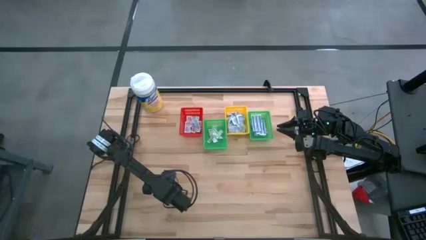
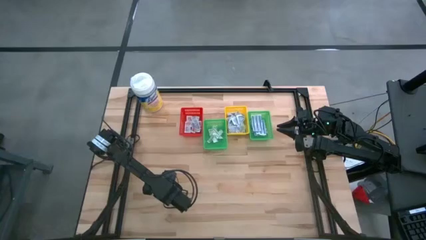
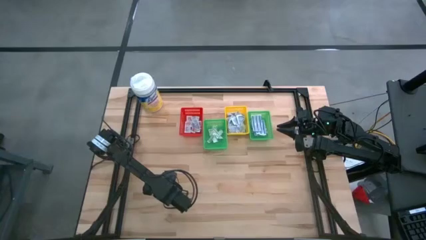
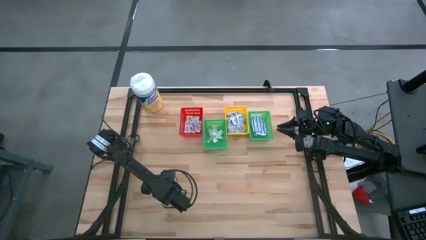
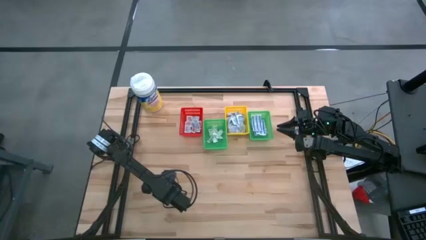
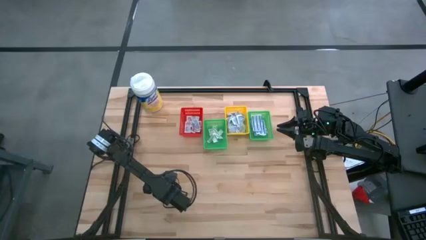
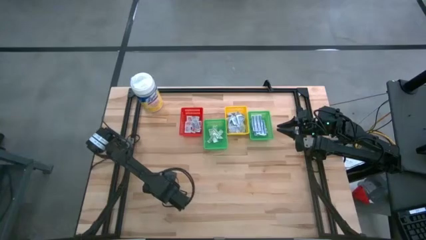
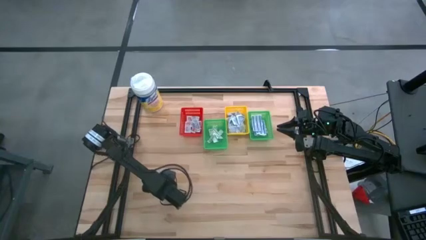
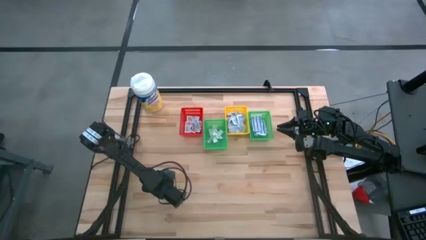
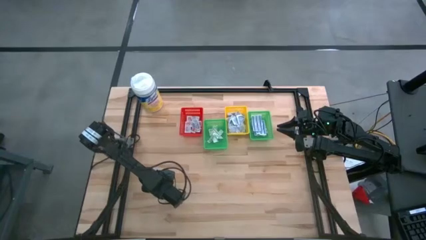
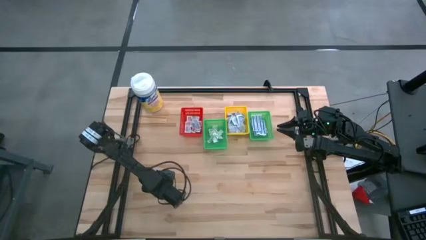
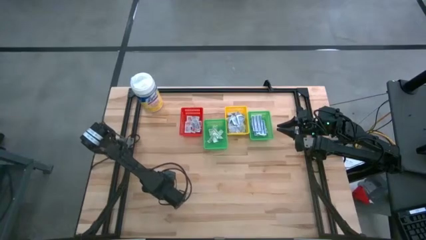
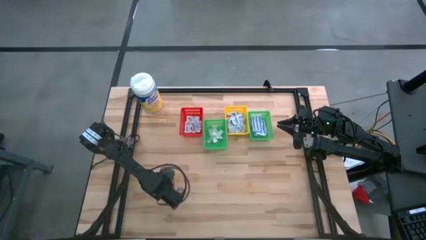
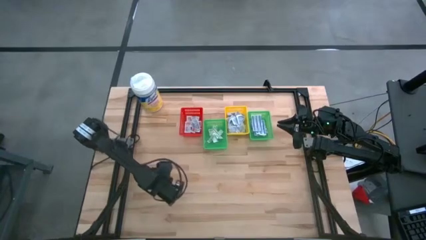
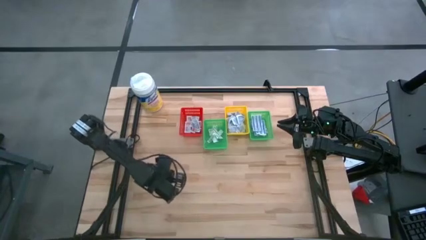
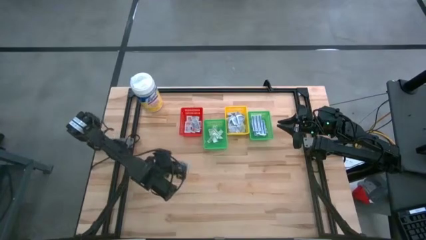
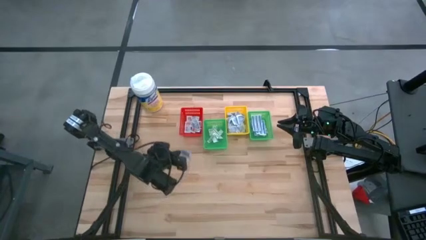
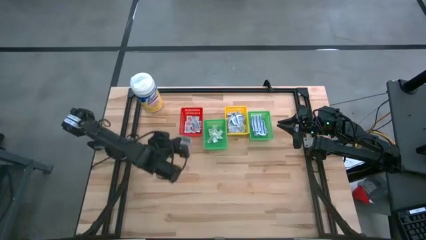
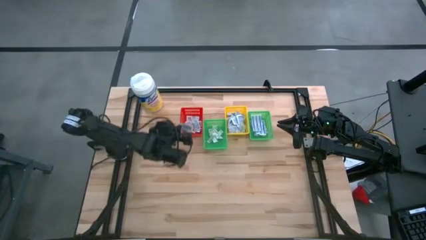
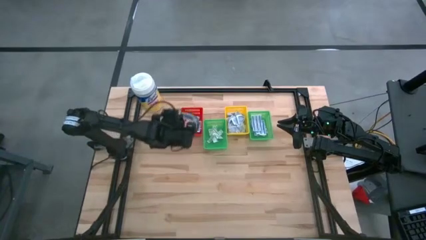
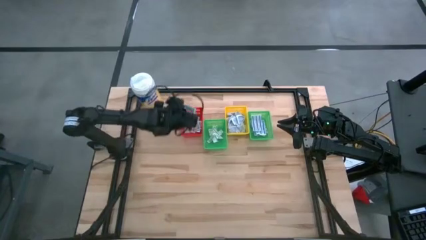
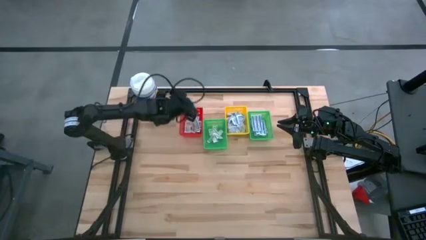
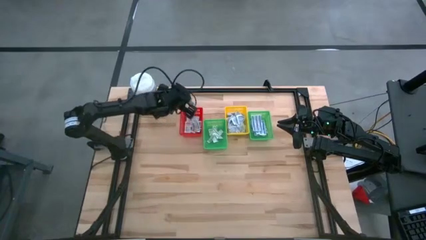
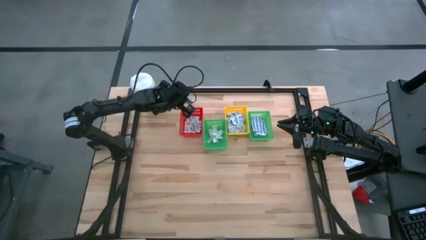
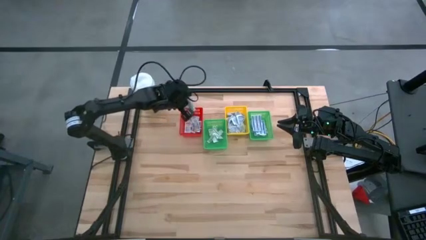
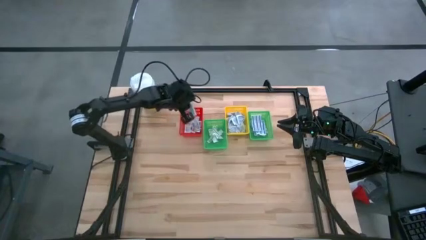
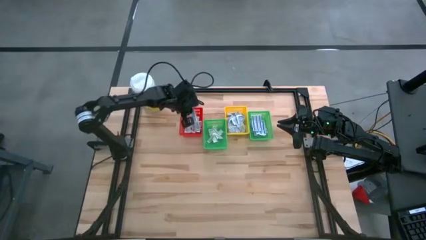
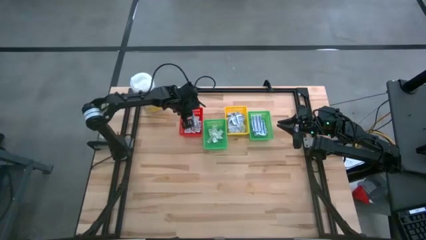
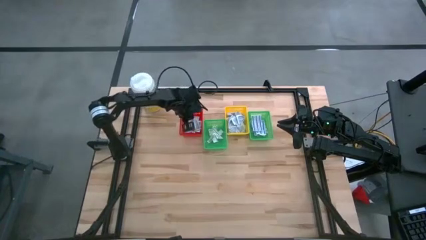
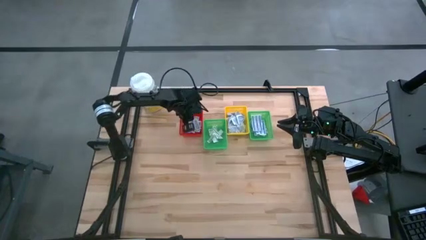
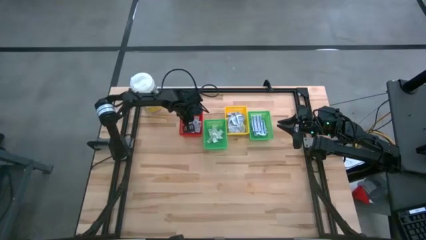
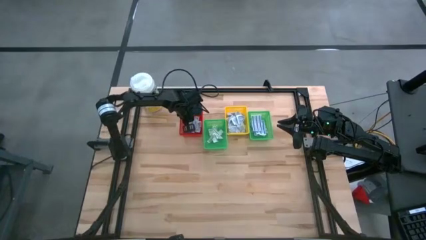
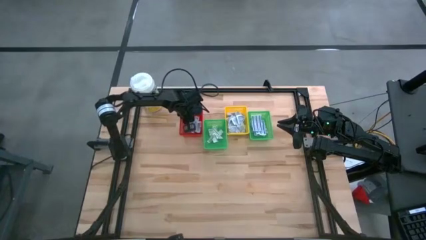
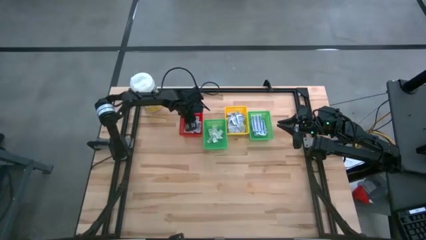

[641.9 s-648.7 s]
Task: Pick & Place First Aid Supplies
Put the ointment pack into the red basket

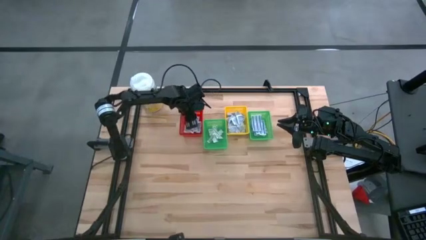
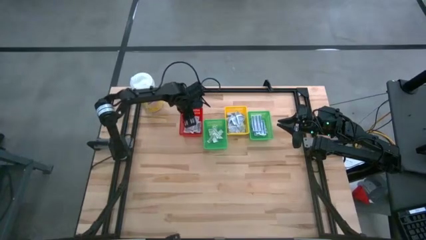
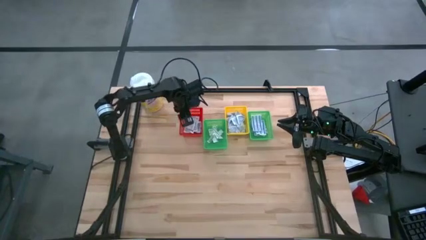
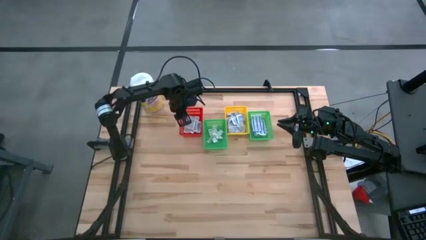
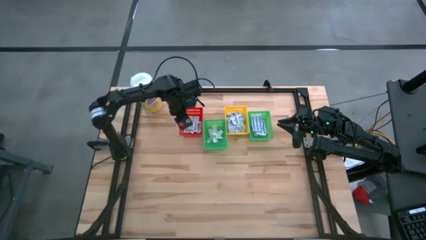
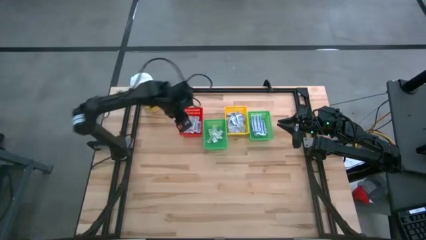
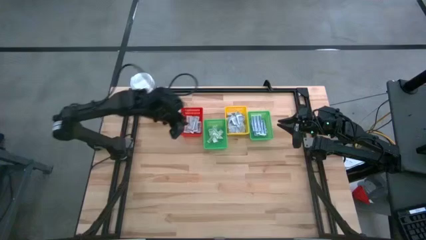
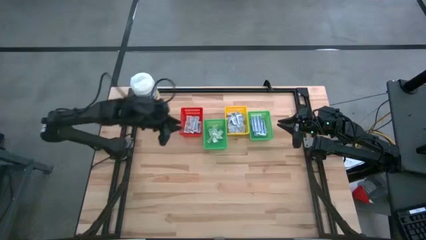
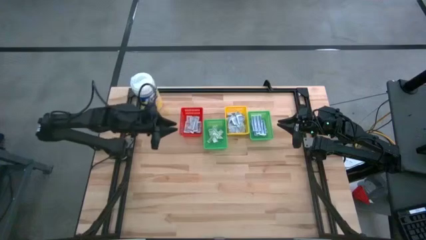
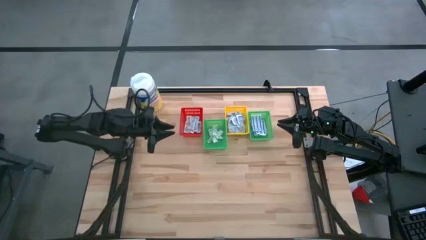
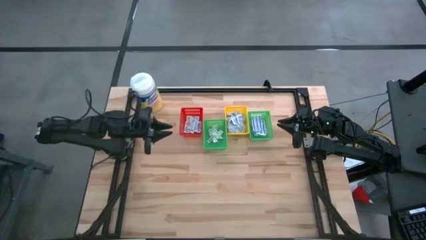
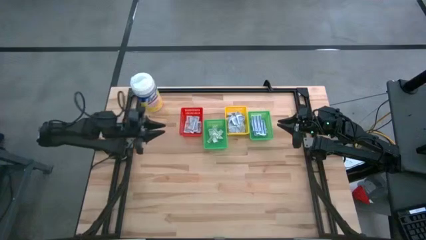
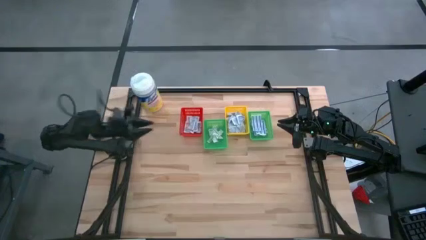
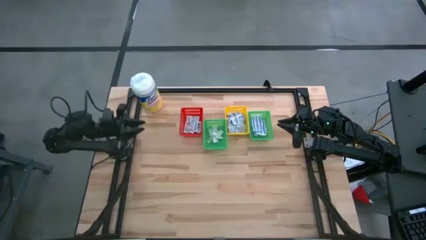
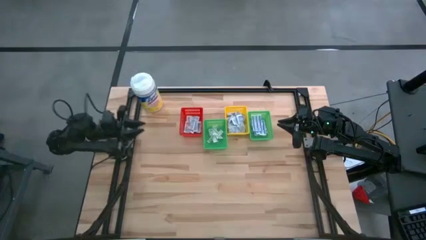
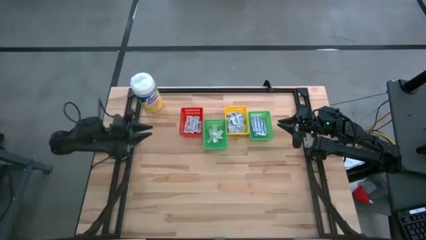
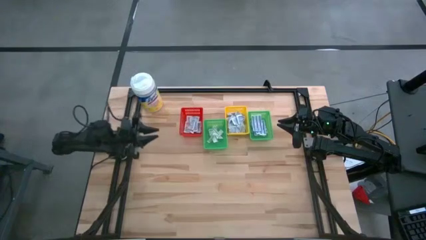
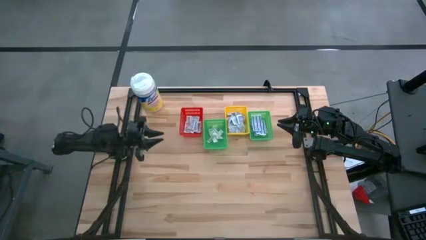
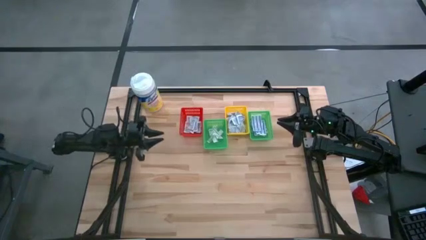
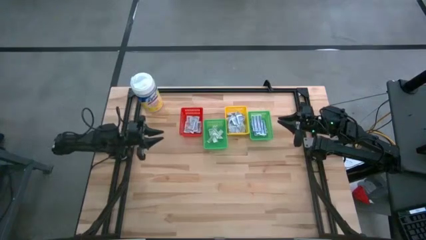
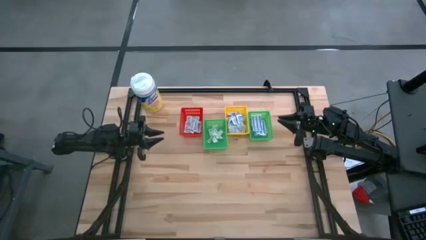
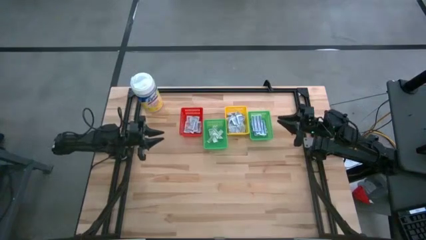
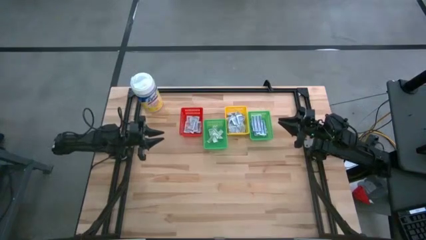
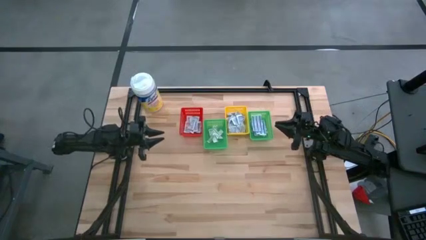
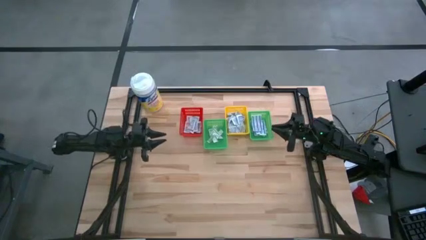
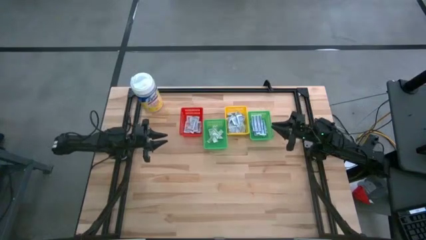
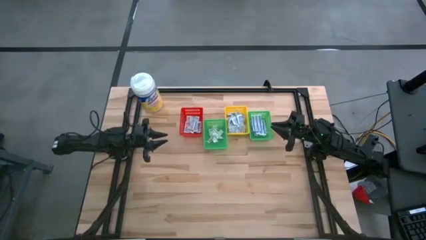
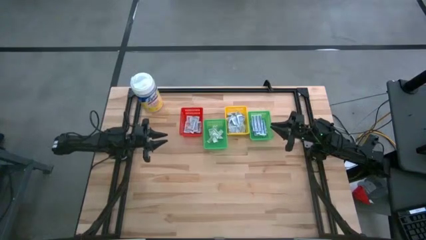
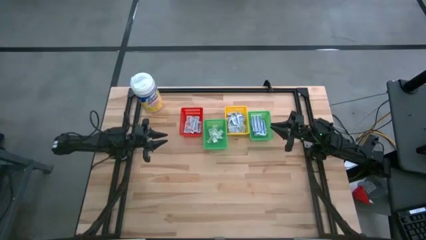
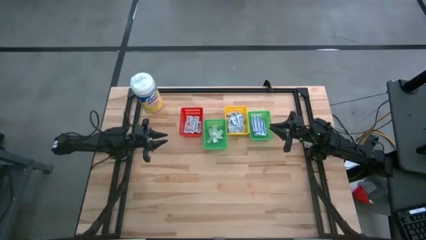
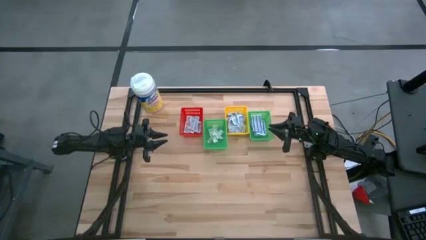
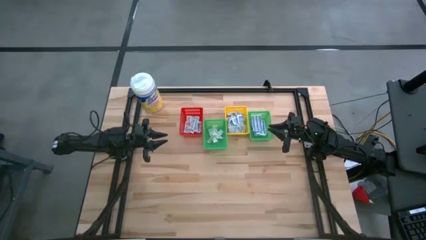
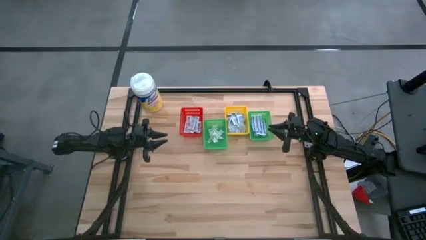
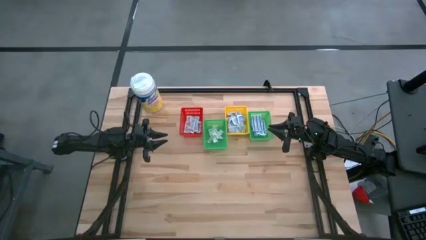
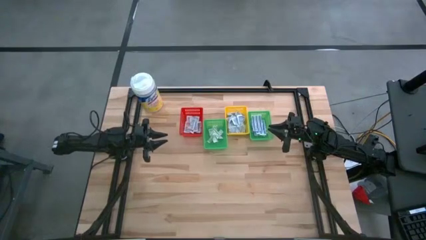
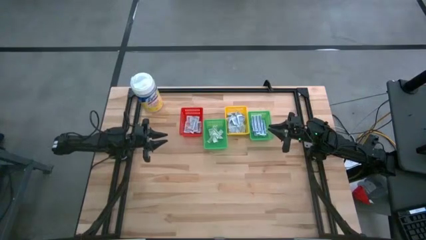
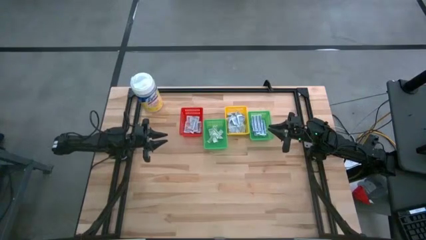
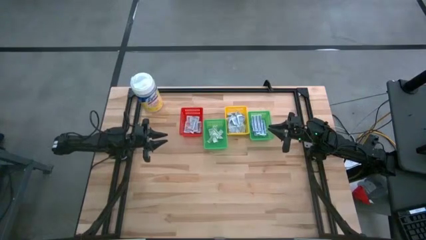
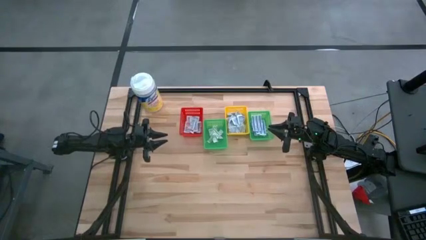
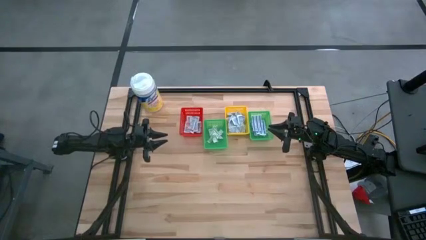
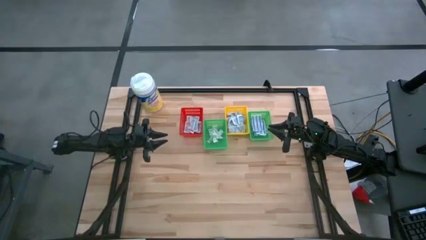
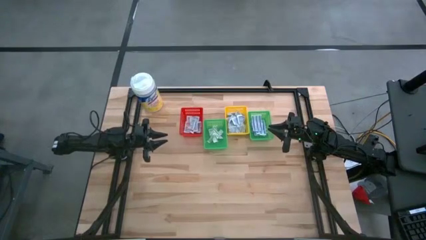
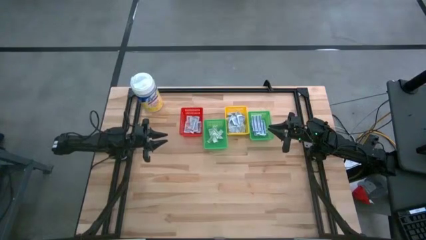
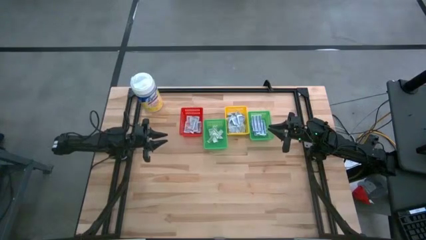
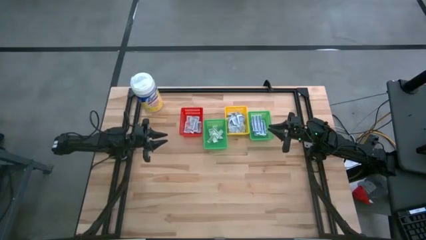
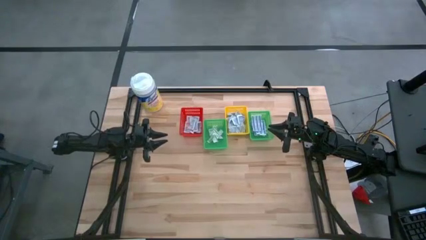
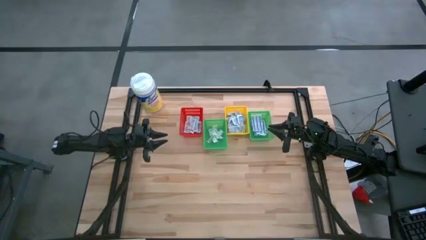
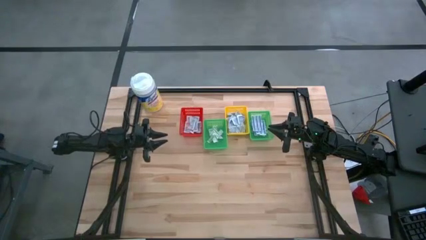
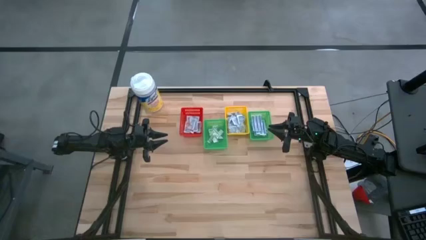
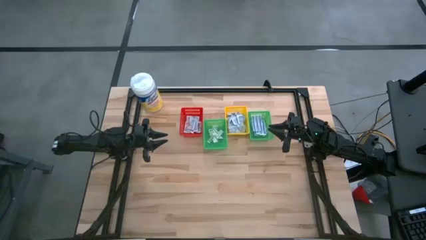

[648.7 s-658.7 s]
Return to Home Position
